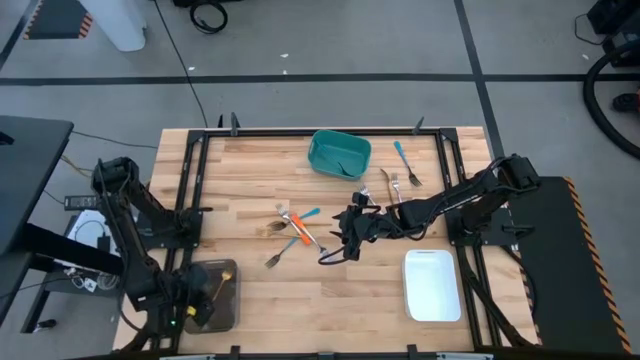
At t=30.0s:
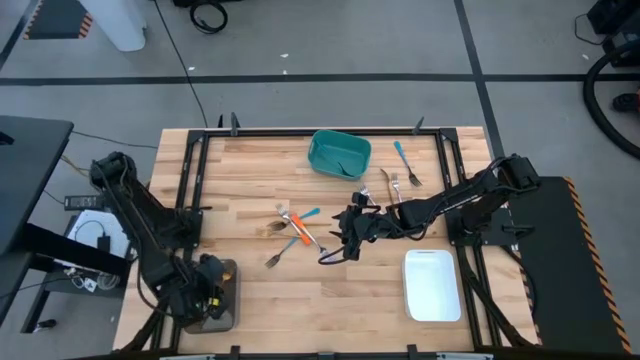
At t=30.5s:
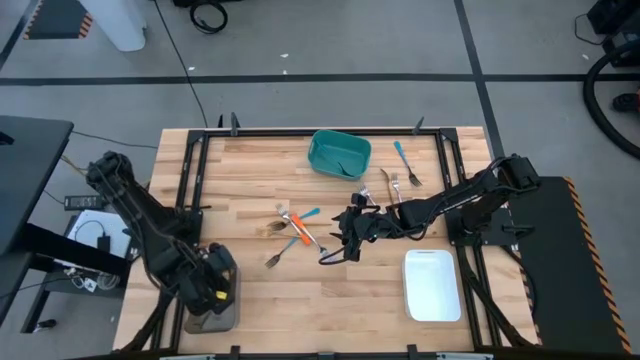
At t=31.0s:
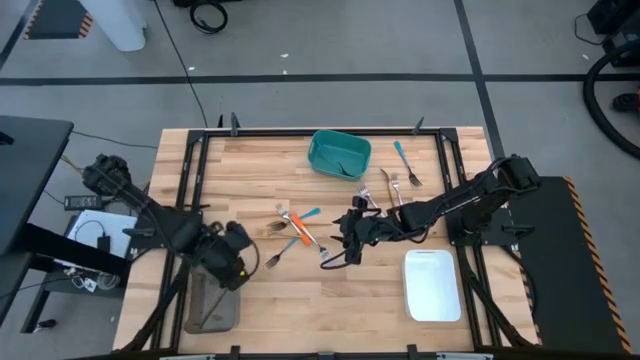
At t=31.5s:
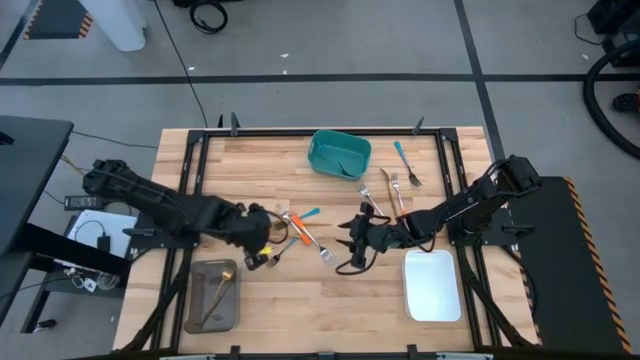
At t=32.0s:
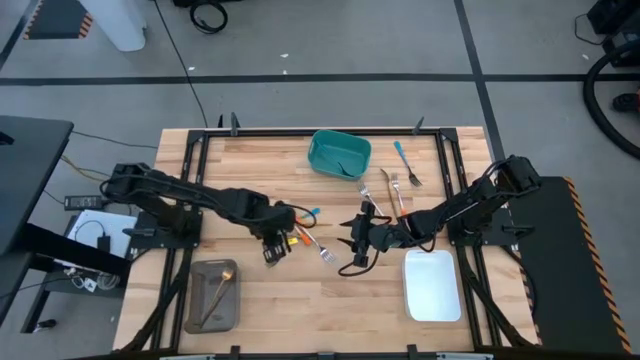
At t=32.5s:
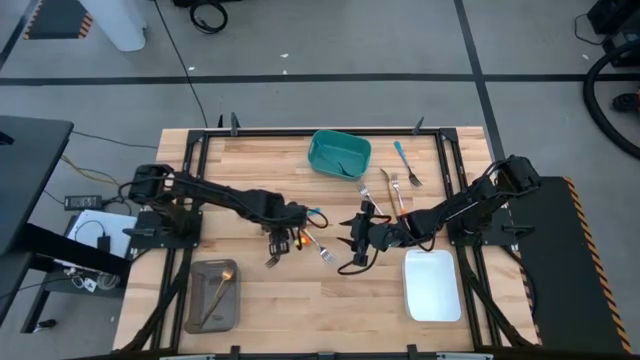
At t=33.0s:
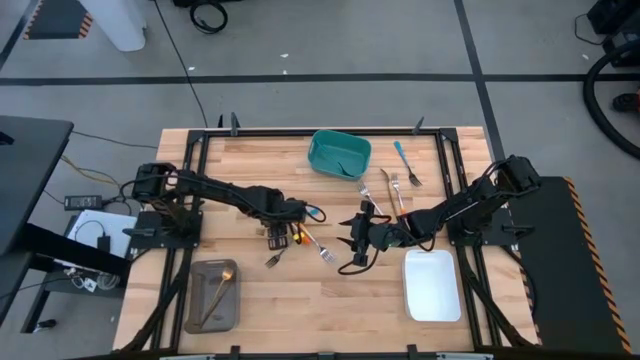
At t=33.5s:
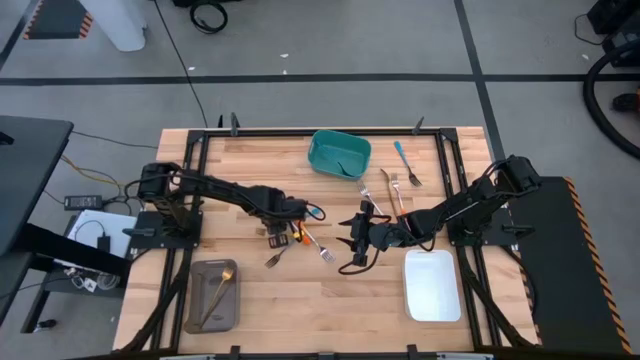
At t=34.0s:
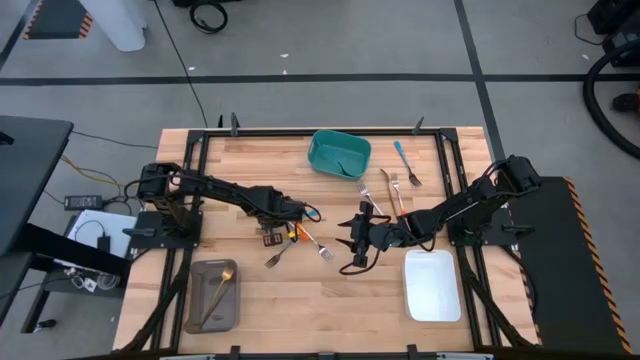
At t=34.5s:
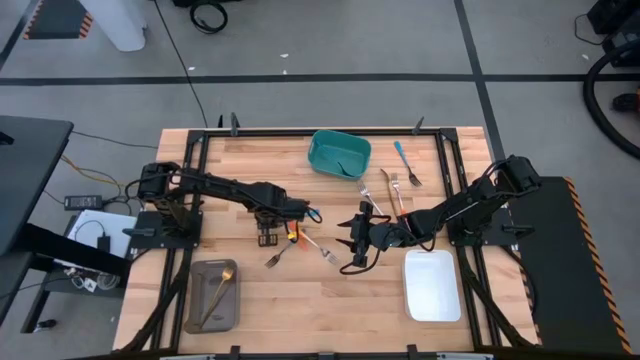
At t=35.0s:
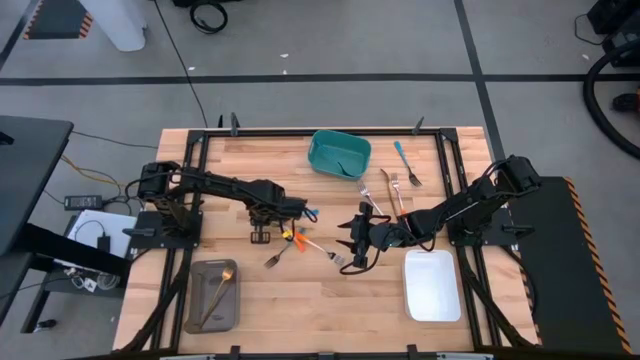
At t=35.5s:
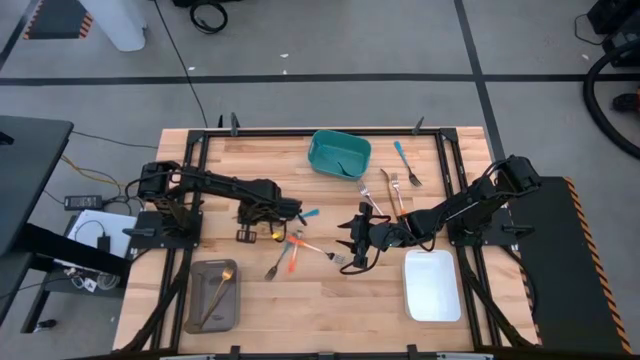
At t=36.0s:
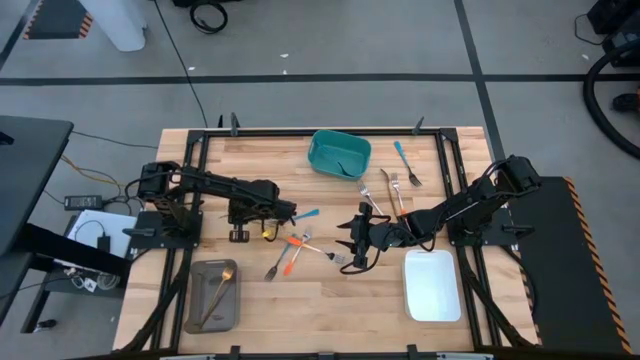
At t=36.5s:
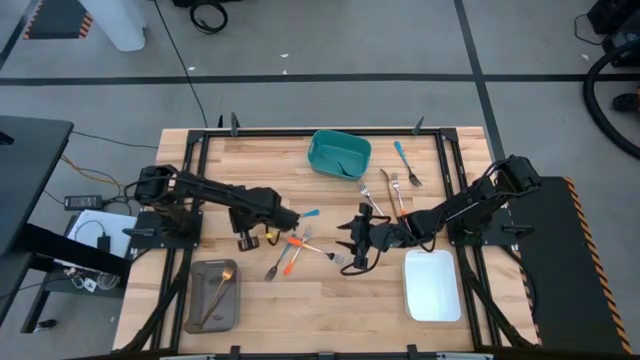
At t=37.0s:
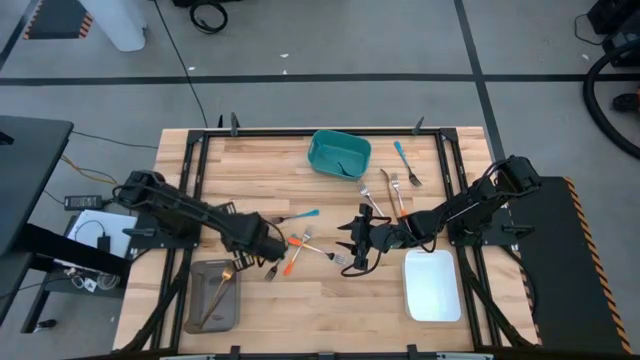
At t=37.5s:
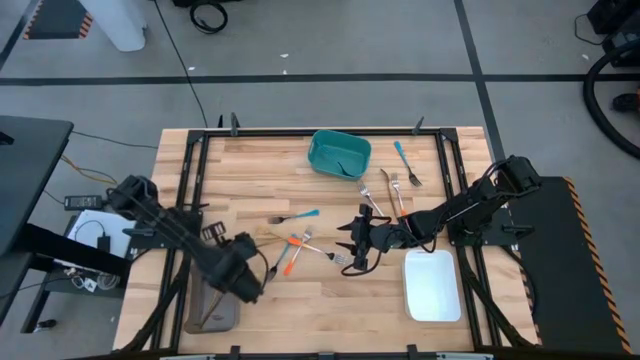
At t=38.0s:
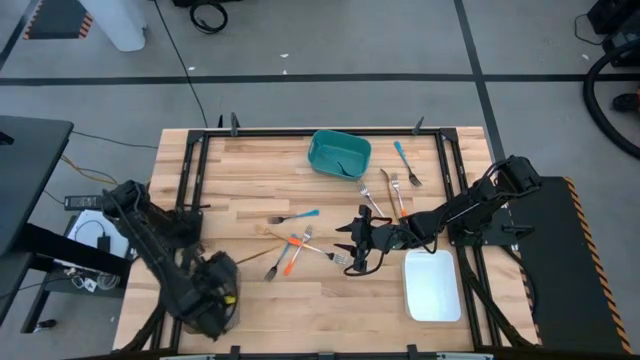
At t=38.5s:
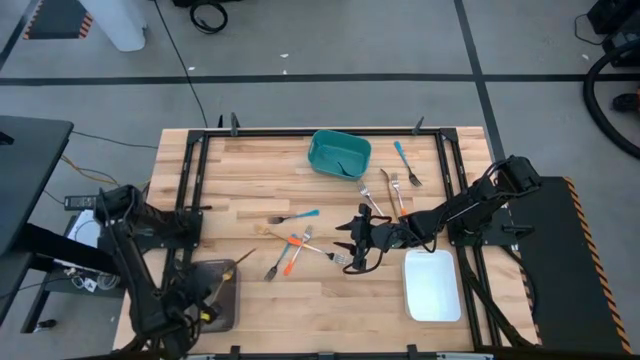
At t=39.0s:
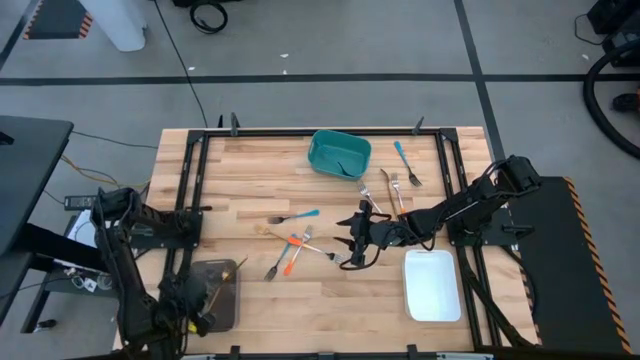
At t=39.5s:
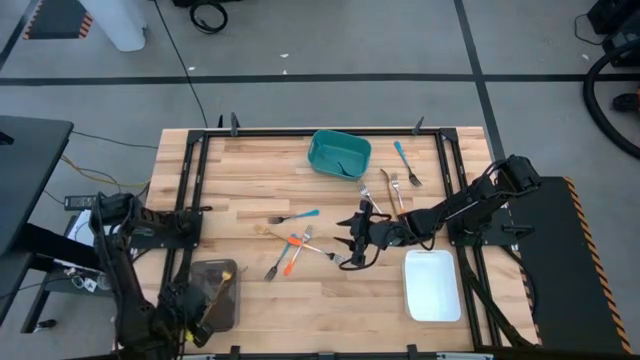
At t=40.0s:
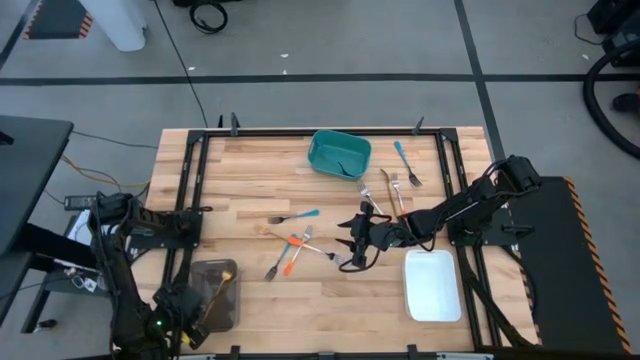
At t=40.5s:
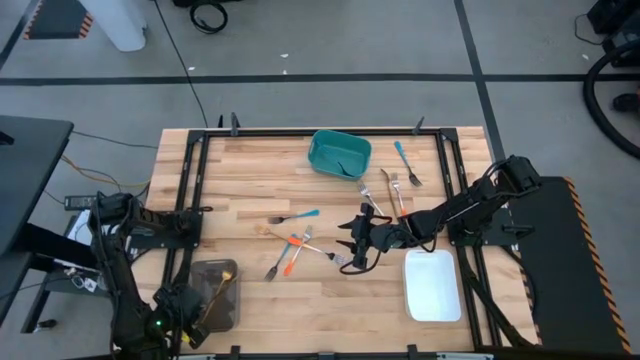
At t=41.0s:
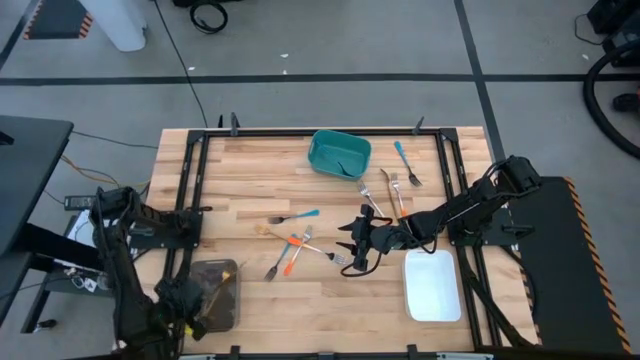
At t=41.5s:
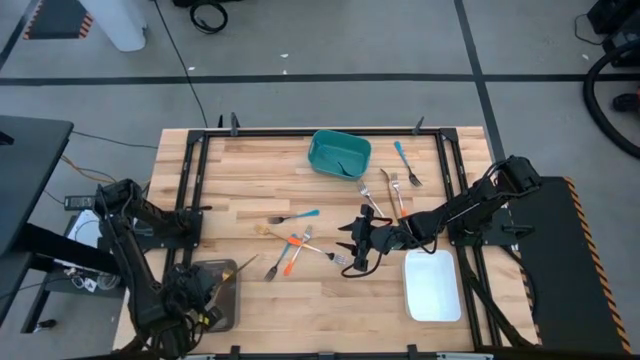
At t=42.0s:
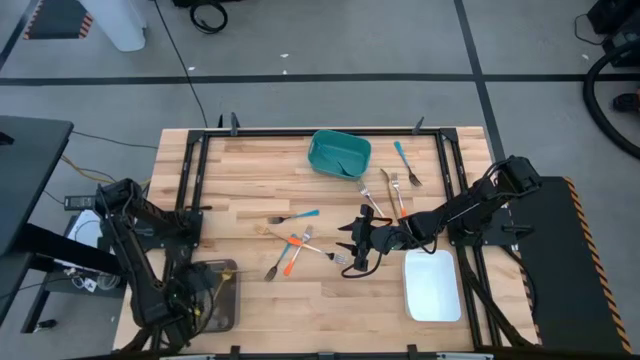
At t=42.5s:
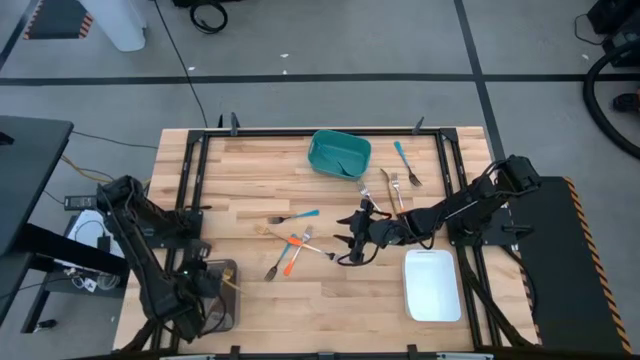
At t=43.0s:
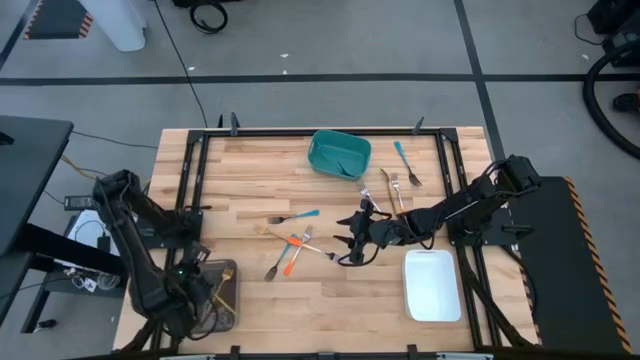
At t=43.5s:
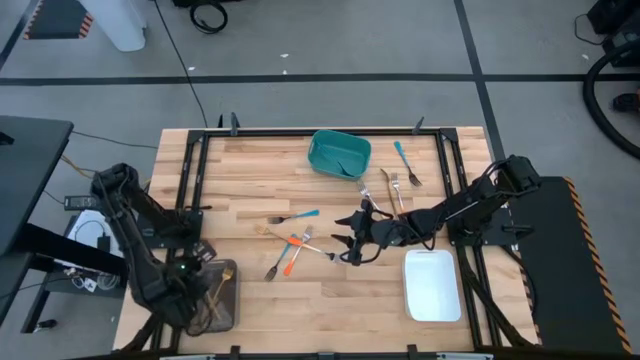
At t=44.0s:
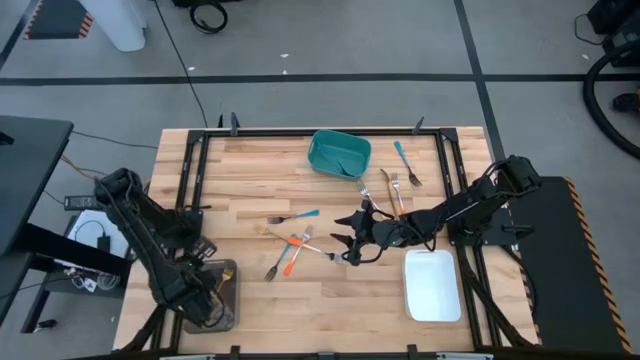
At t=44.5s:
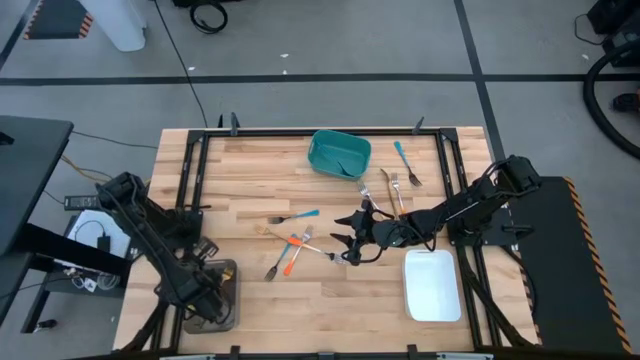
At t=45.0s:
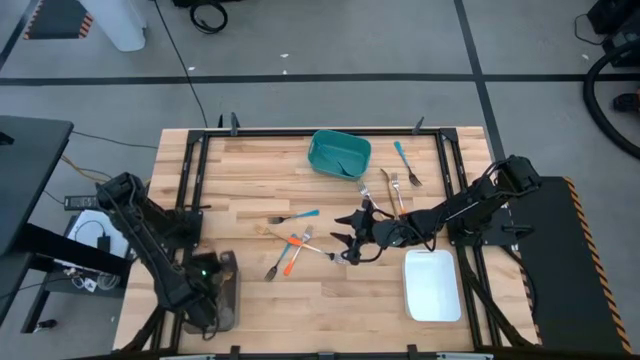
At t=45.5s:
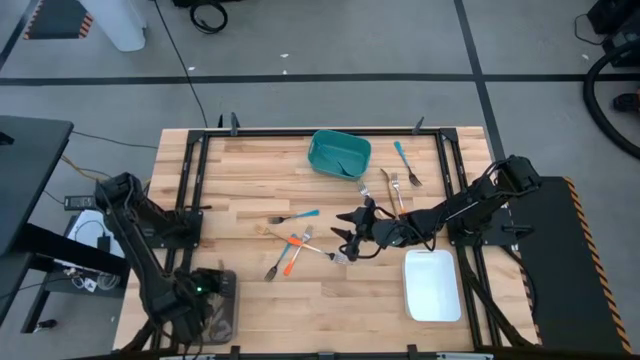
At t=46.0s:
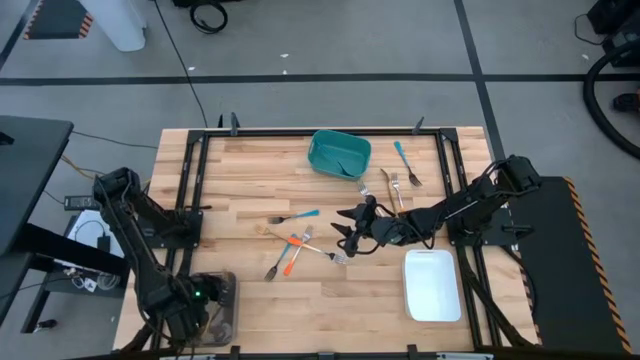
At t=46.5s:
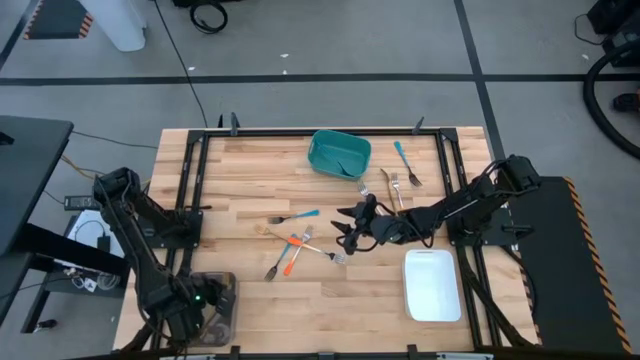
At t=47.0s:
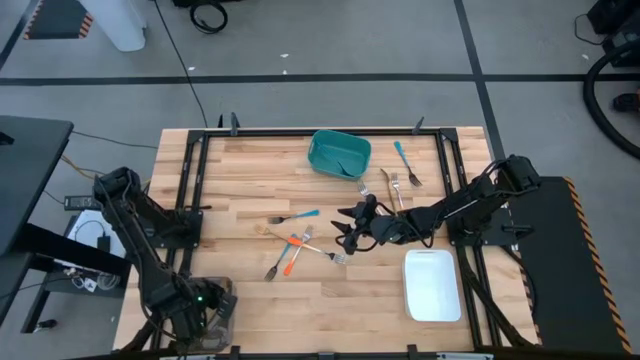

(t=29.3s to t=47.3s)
Task: Sort silverware by color (type)
Put the gold fork into the black bin

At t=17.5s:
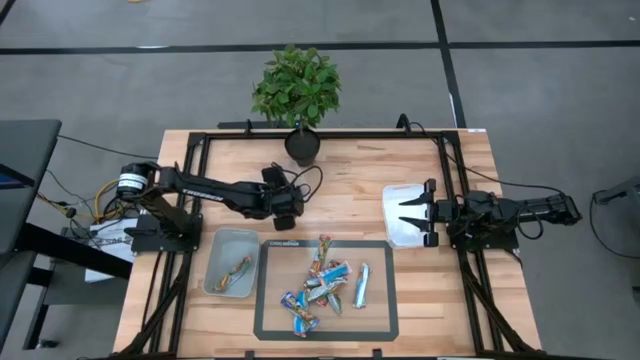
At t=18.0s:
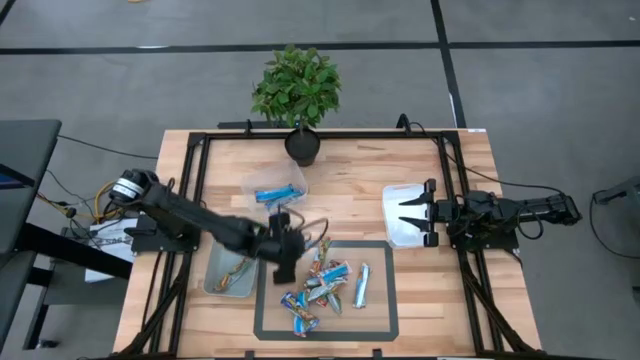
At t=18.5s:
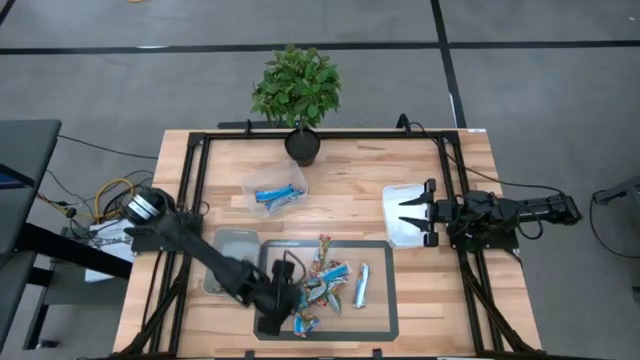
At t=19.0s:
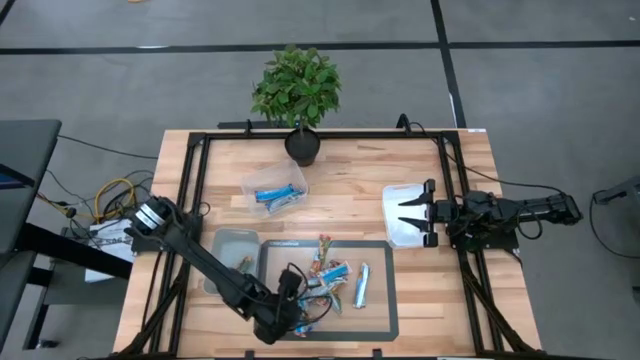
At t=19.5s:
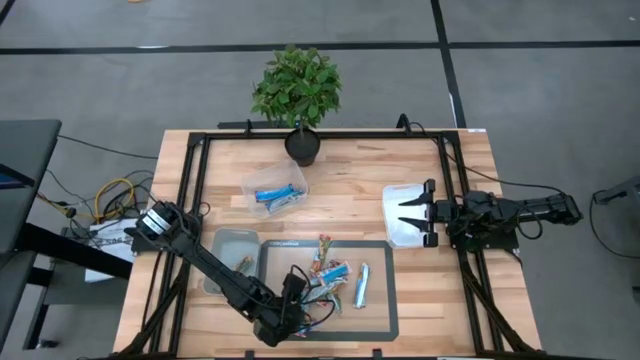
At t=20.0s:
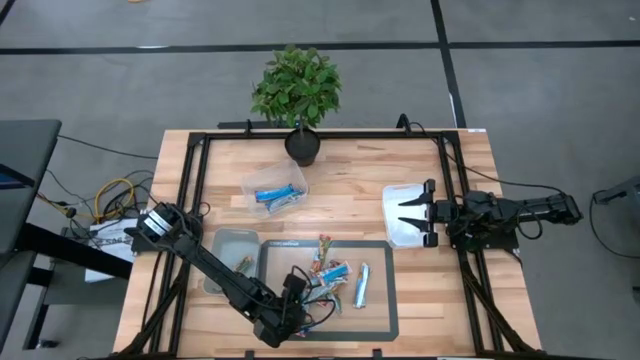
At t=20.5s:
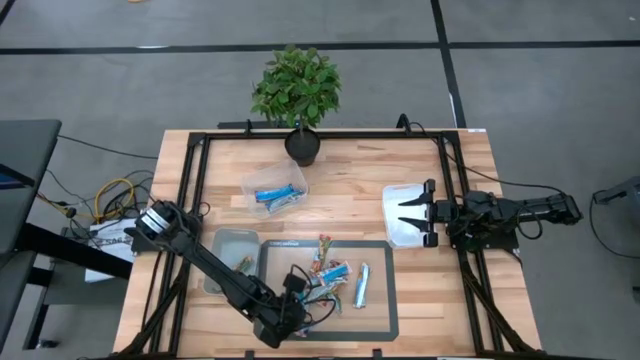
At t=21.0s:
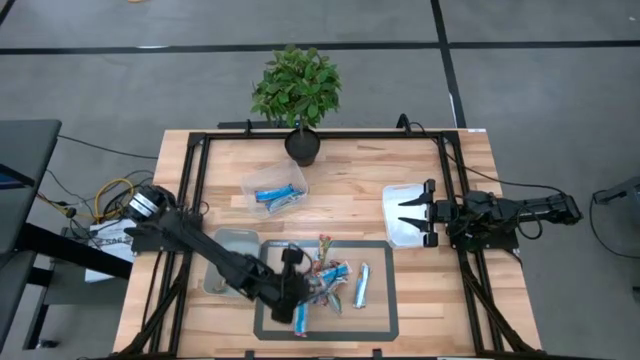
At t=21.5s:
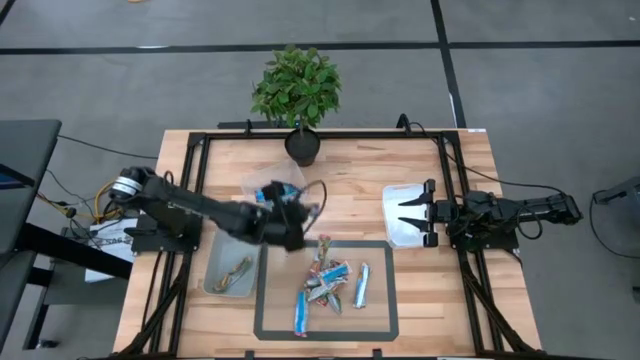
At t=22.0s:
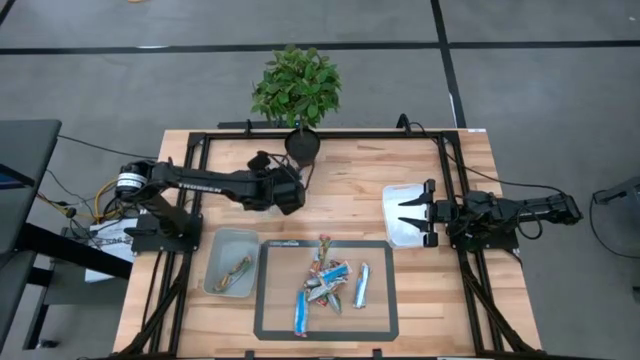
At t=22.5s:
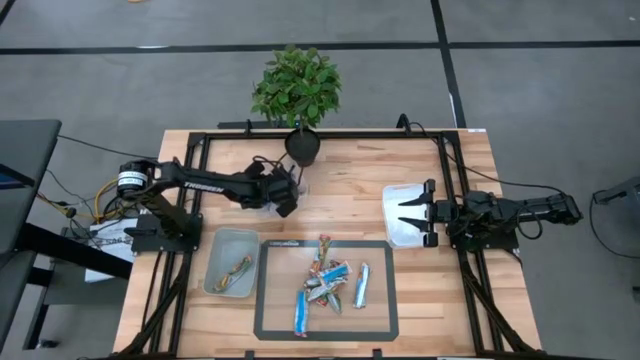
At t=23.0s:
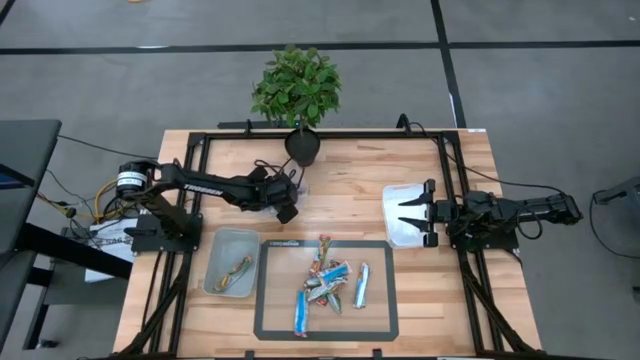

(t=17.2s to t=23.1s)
Task: Pick and place Granola Bars by type
Put the blue granola bar into the transparent bin
